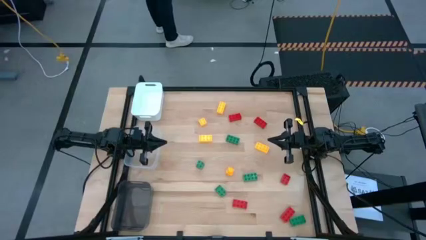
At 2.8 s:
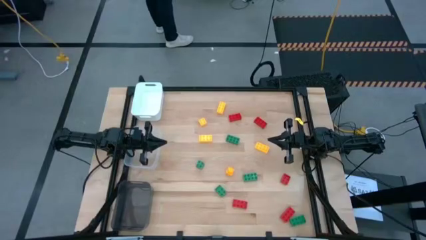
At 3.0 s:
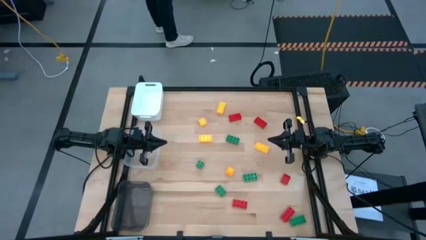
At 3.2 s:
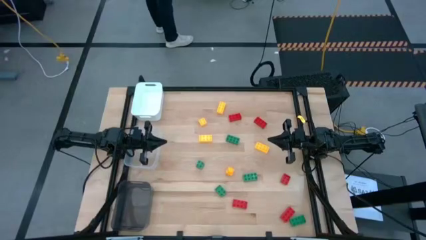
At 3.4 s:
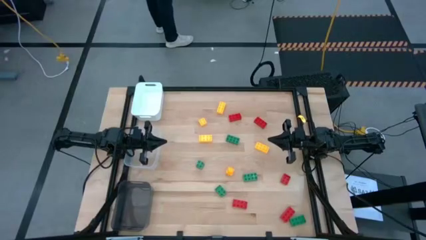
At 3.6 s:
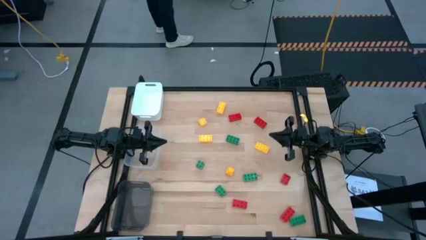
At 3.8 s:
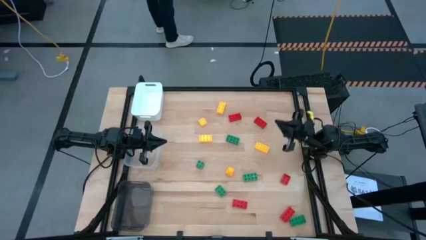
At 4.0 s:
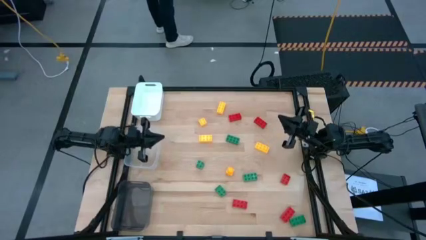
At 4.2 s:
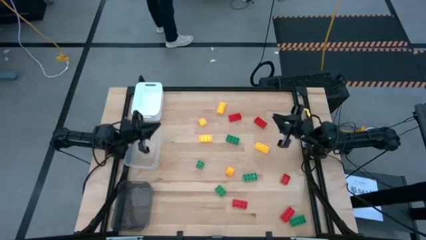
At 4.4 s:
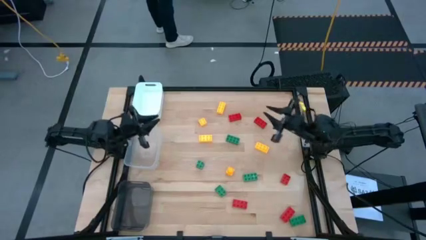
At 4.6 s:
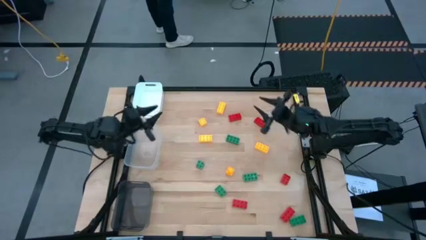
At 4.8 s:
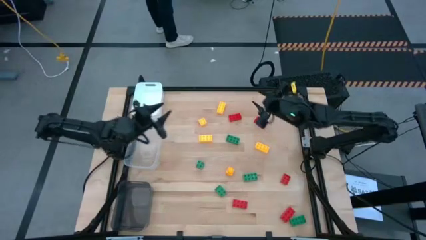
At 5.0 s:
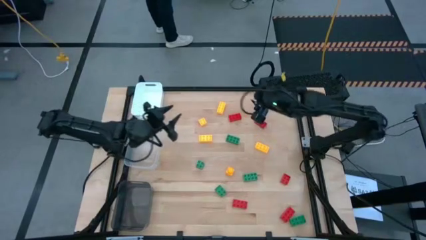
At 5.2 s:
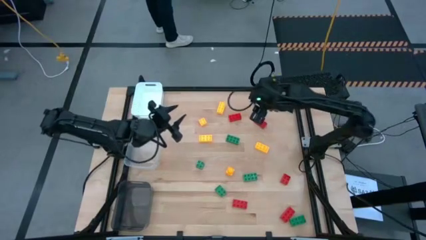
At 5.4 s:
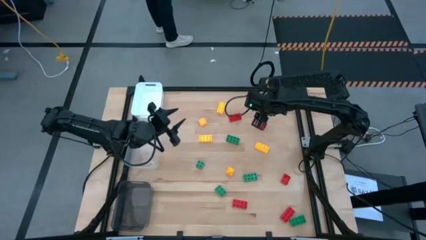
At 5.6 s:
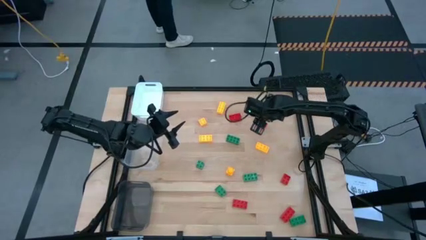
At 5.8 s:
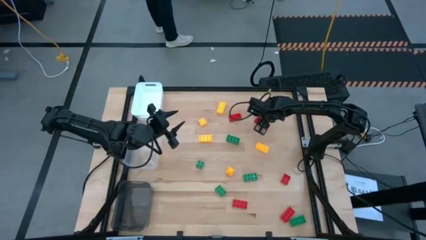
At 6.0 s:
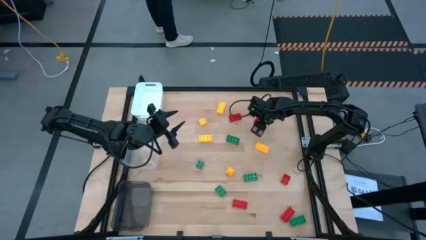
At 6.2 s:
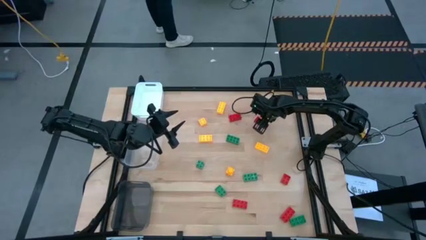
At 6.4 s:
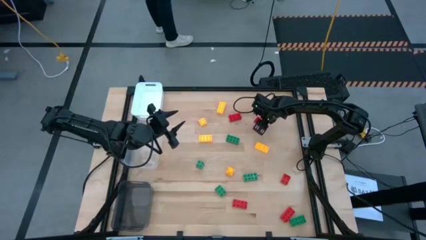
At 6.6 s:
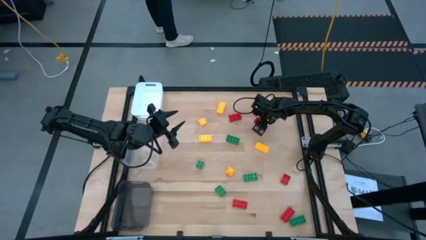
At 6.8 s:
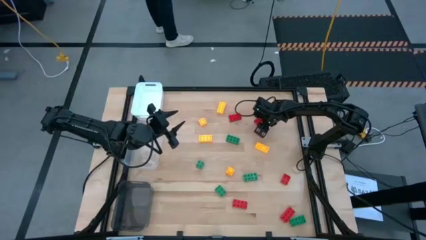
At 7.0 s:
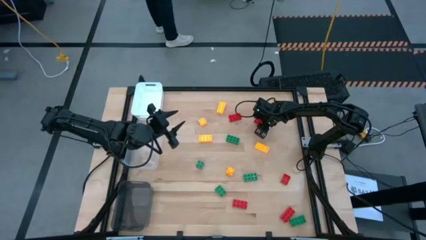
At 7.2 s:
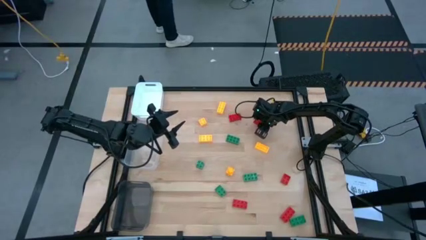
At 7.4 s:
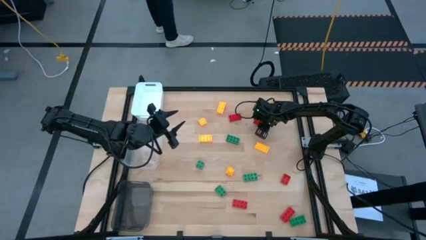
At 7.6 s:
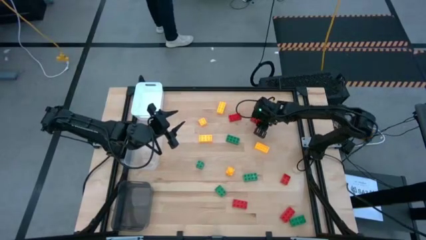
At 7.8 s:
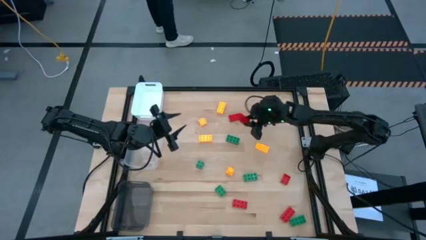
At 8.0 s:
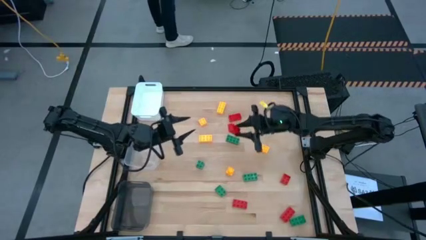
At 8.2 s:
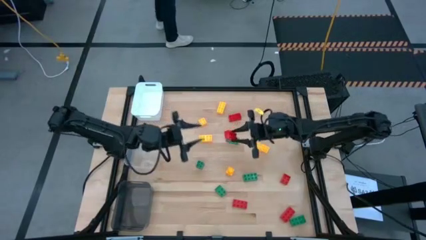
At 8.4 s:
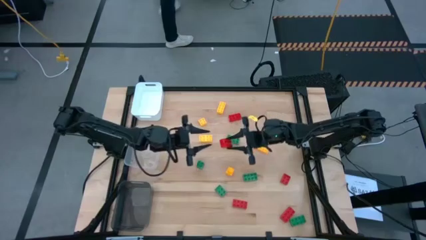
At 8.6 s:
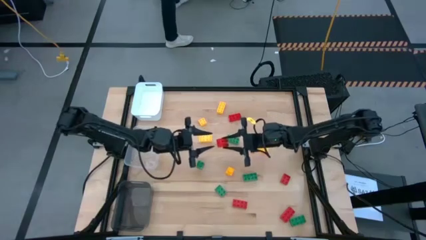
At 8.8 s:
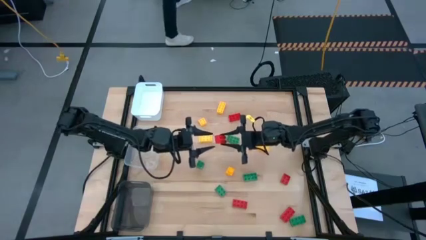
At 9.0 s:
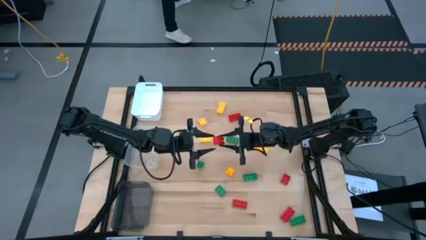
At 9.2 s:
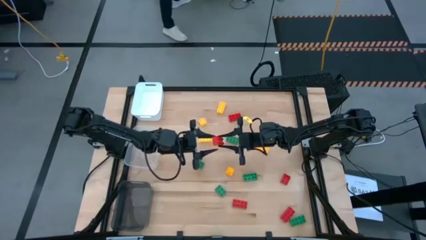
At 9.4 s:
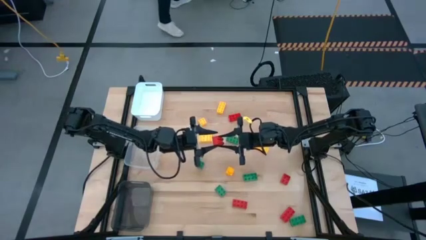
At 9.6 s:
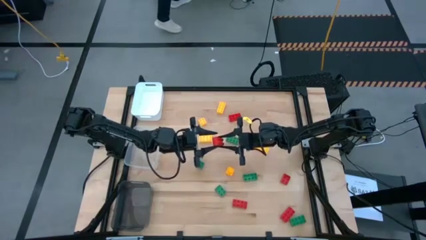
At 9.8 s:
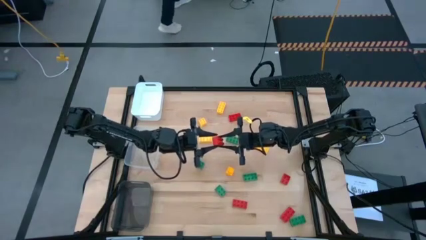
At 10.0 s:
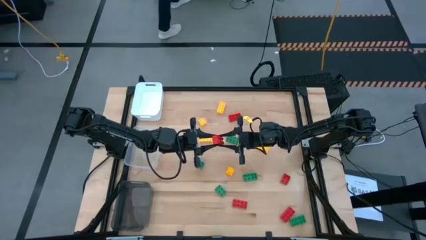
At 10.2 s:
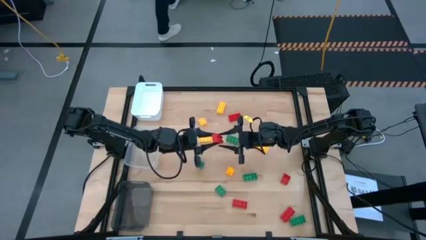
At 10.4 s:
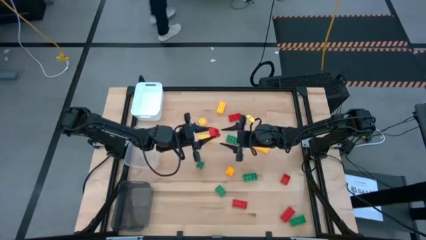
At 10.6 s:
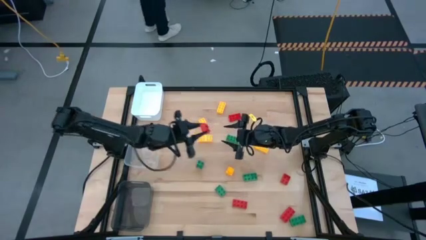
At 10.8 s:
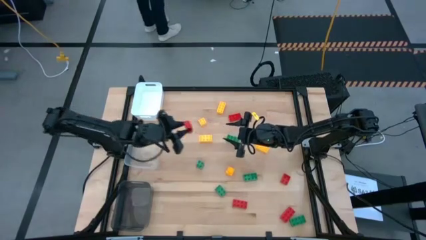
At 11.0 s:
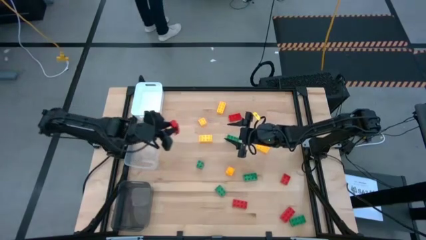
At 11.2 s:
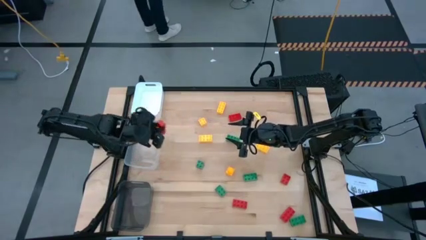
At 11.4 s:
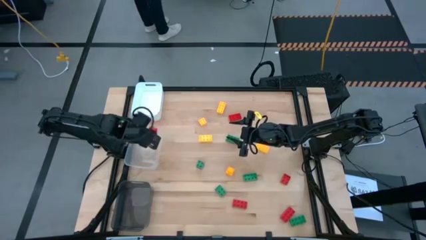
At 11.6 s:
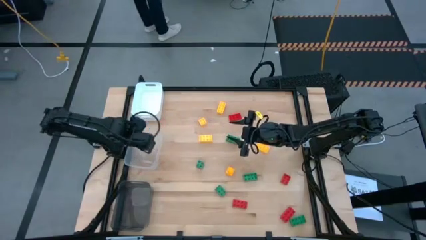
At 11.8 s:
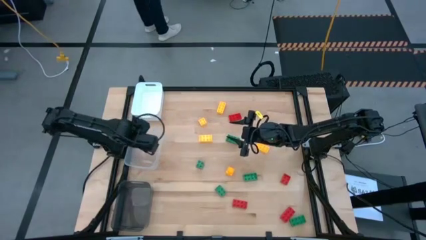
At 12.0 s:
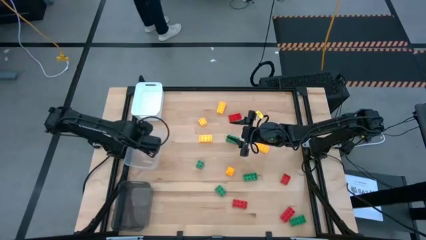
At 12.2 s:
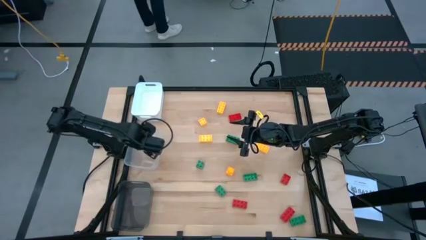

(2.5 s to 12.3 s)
Task: Sort & place blocks by color
Put the red game piece into the transparent bin

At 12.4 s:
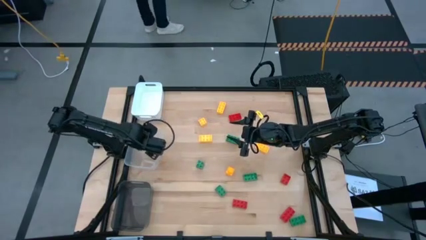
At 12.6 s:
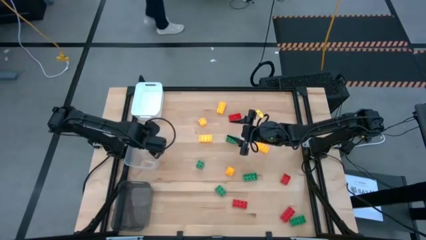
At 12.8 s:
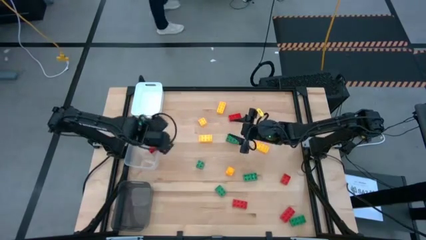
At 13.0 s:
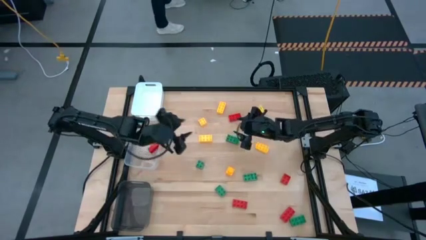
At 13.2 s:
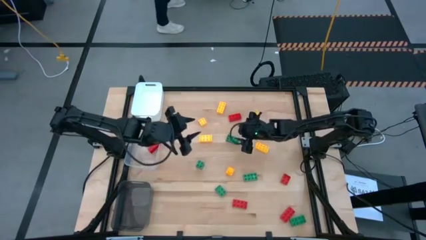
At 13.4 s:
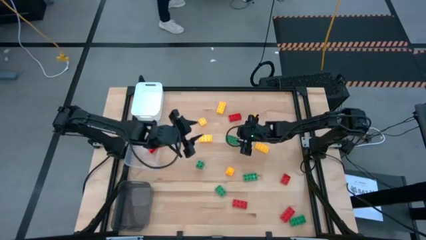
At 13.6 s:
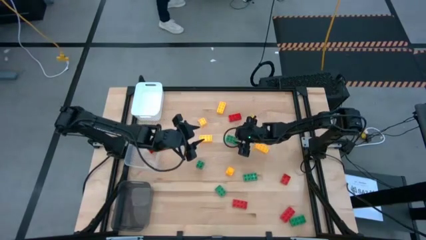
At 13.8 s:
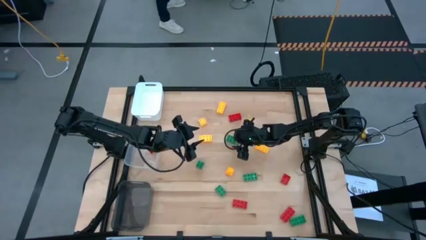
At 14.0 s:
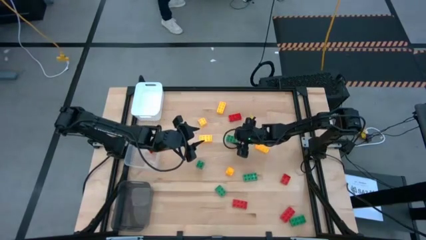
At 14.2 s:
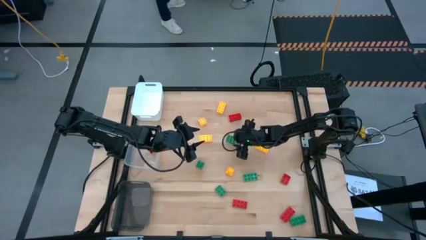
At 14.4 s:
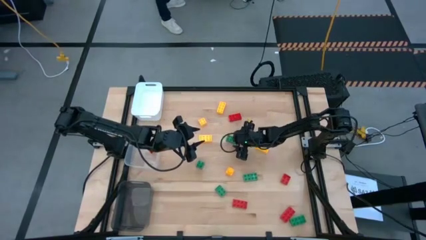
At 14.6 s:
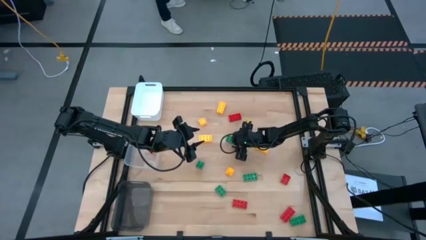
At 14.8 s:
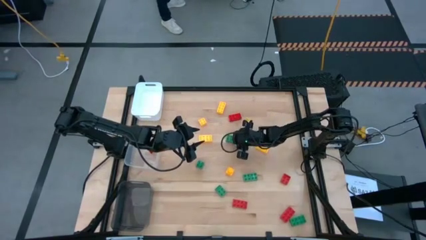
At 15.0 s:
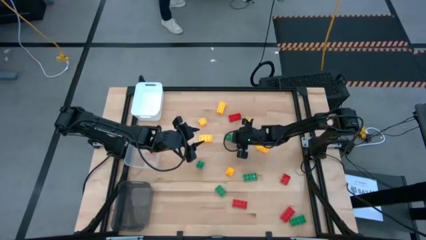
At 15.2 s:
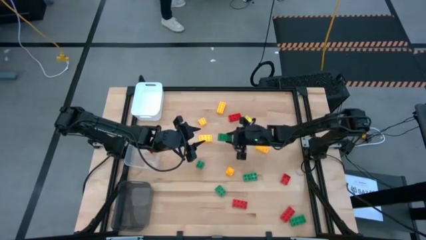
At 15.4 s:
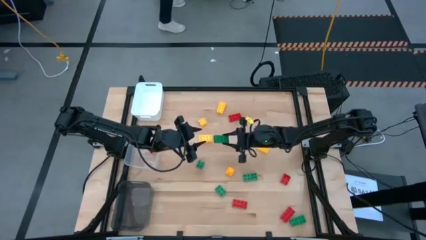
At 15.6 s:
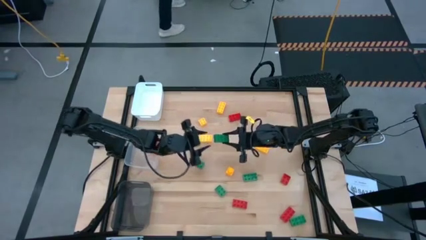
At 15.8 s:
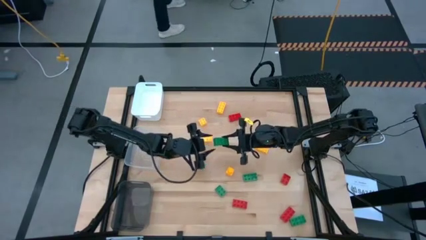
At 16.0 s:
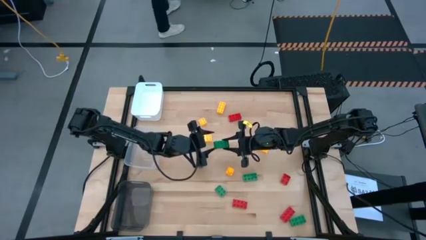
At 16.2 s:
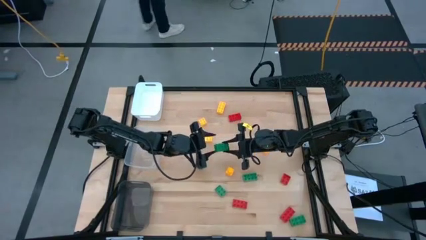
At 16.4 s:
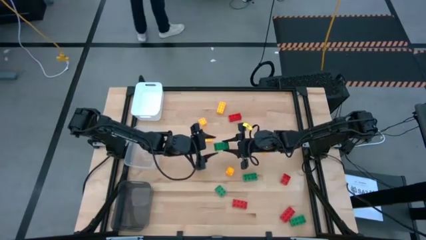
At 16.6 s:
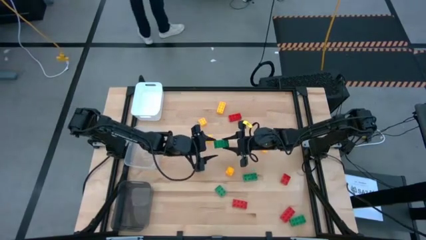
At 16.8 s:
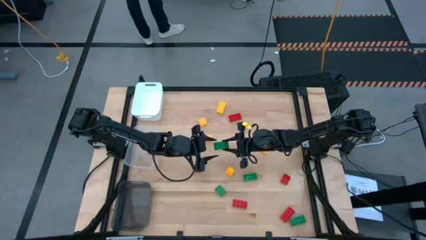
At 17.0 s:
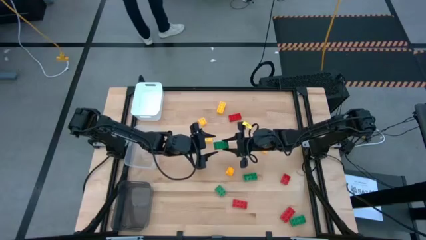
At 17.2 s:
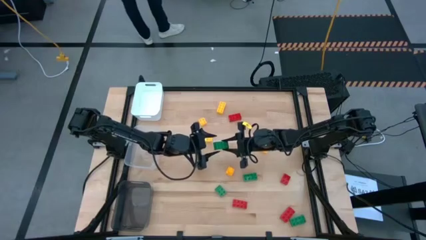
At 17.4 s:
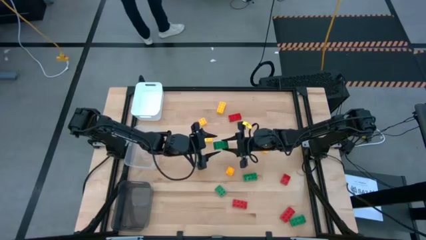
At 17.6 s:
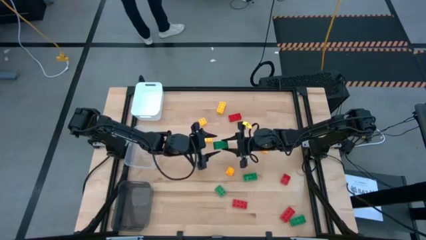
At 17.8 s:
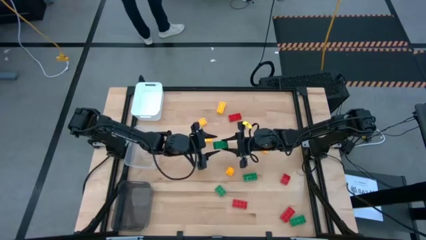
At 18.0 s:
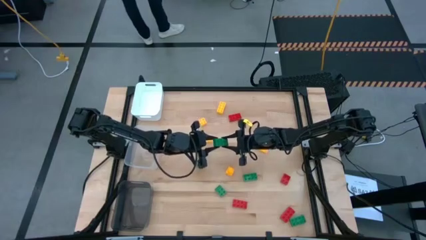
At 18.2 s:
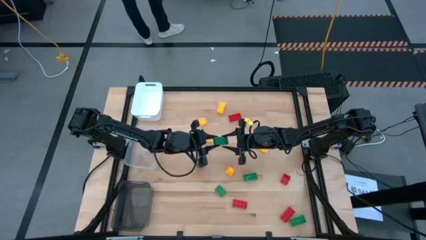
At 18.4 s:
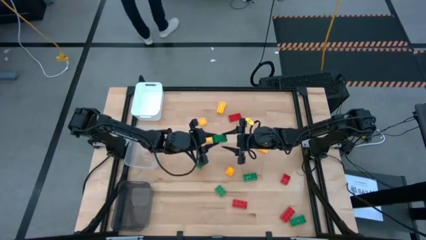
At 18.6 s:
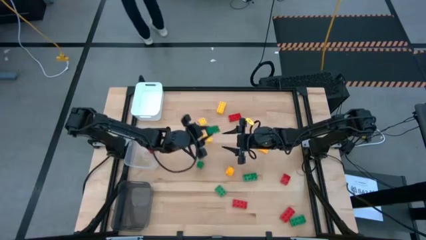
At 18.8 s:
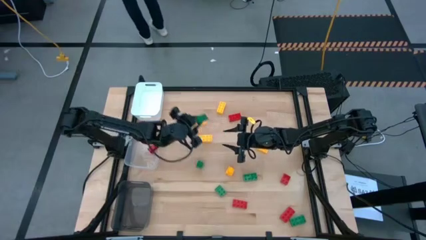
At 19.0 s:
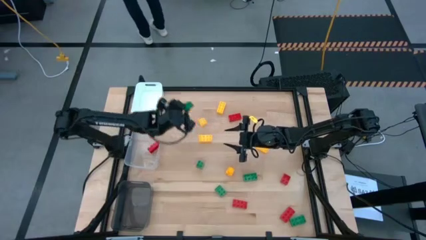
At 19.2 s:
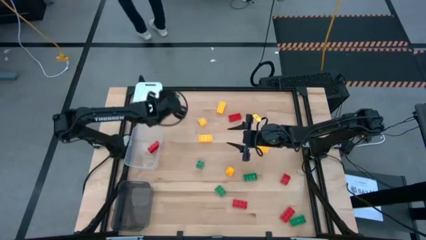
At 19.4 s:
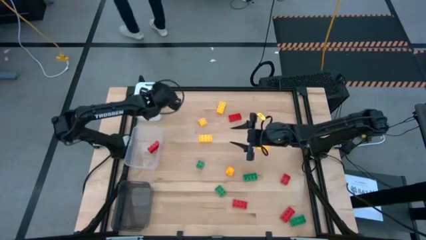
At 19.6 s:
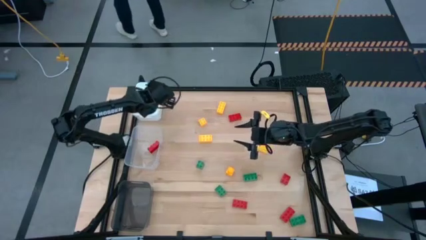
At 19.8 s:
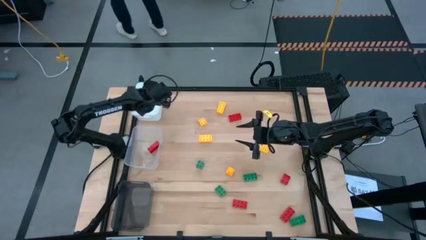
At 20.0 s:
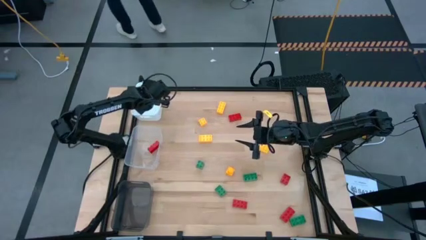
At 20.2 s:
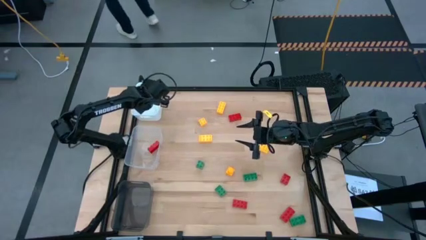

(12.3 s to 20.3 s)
Put the green game piece into the white bin
